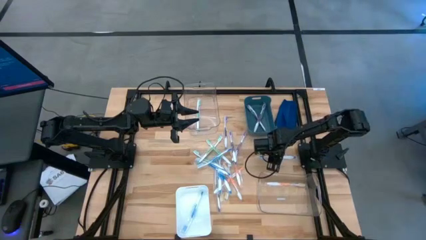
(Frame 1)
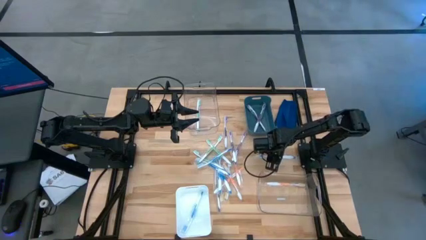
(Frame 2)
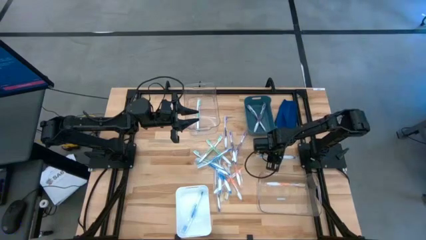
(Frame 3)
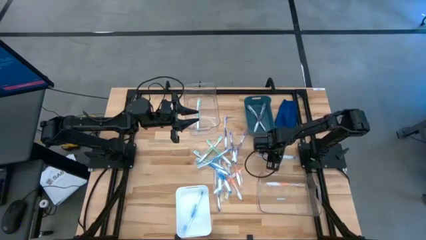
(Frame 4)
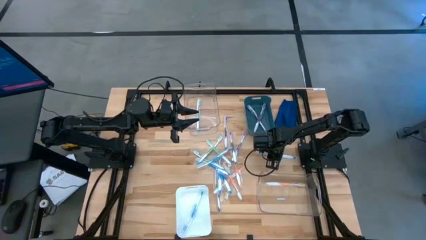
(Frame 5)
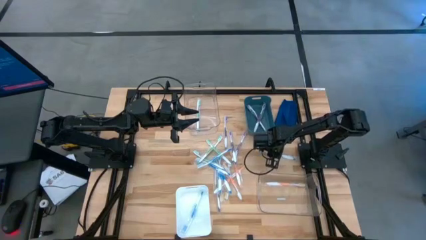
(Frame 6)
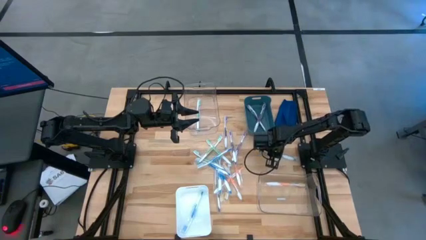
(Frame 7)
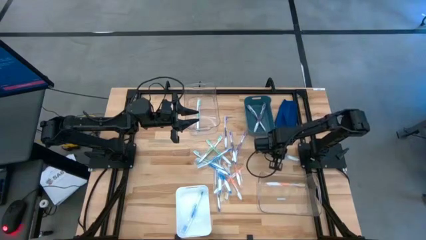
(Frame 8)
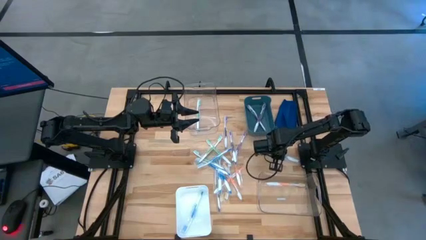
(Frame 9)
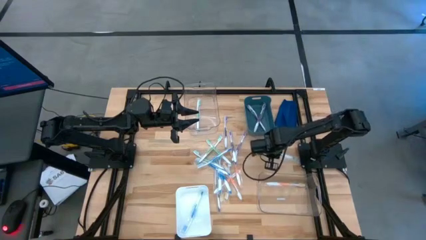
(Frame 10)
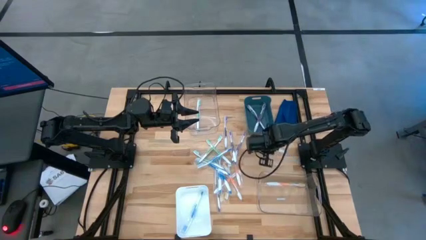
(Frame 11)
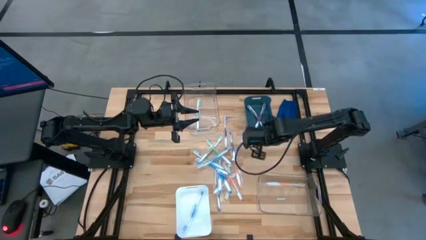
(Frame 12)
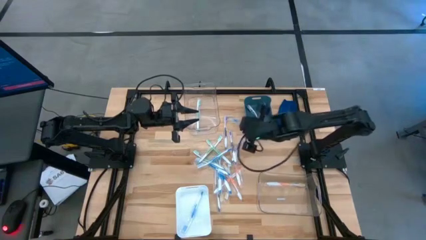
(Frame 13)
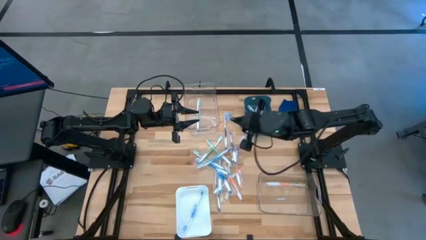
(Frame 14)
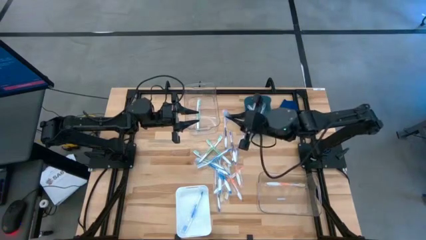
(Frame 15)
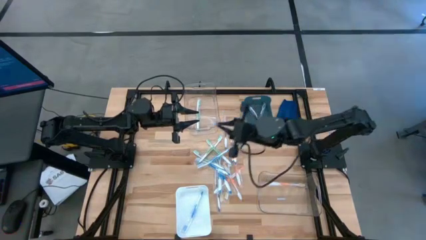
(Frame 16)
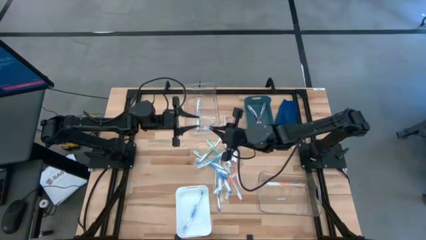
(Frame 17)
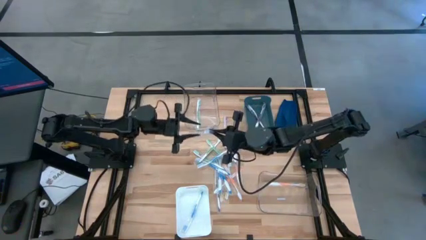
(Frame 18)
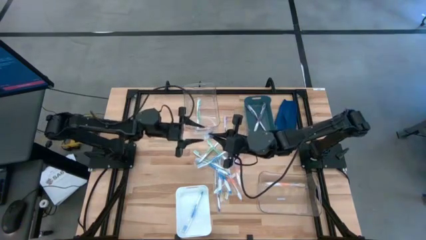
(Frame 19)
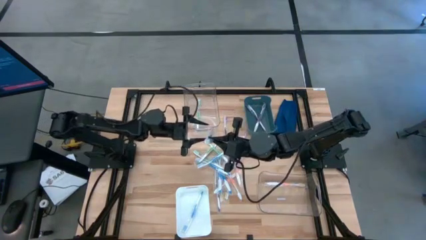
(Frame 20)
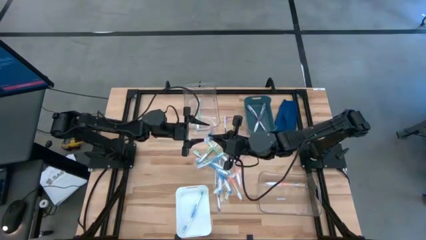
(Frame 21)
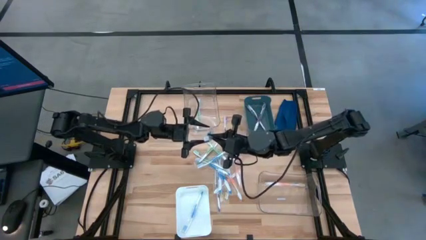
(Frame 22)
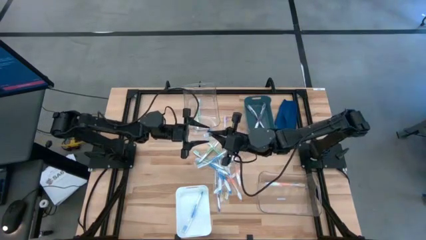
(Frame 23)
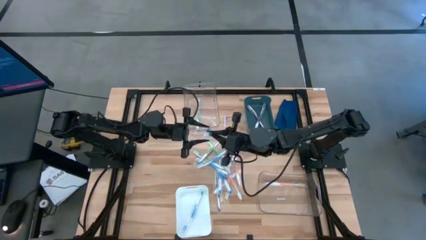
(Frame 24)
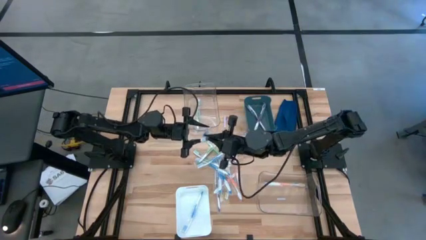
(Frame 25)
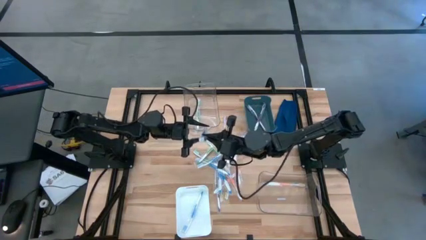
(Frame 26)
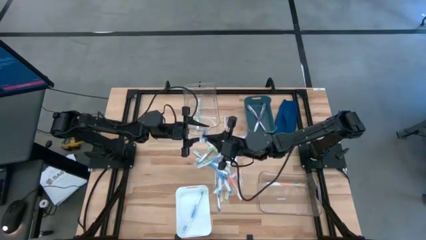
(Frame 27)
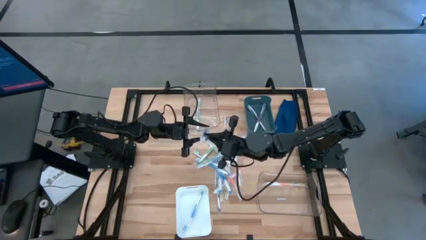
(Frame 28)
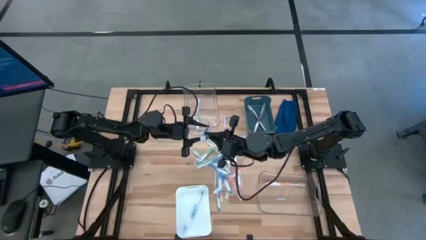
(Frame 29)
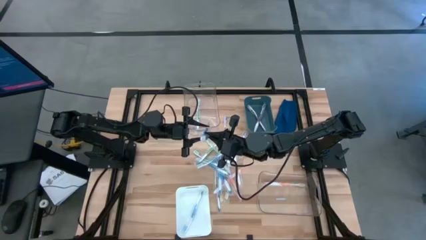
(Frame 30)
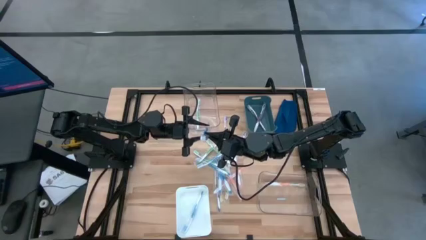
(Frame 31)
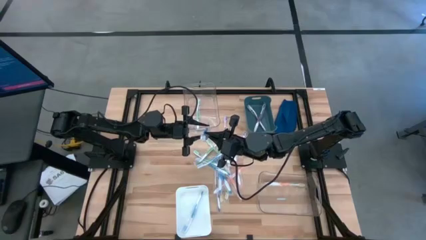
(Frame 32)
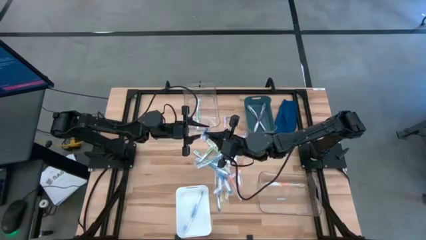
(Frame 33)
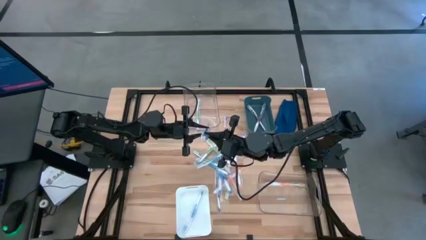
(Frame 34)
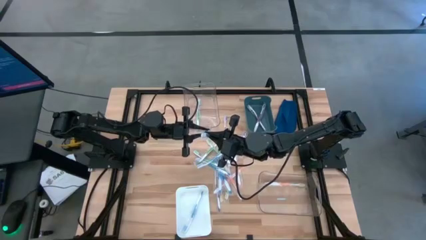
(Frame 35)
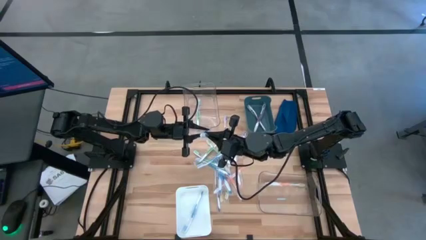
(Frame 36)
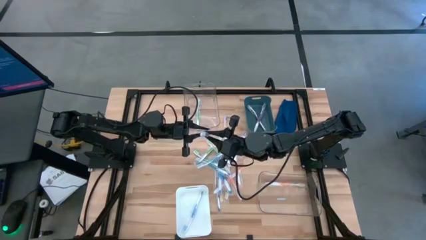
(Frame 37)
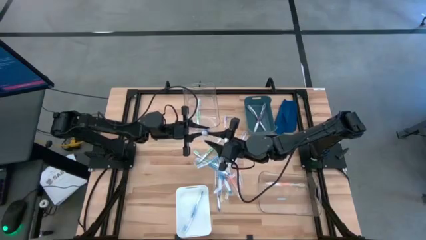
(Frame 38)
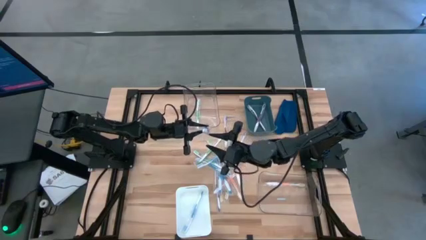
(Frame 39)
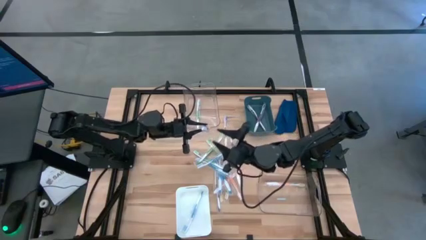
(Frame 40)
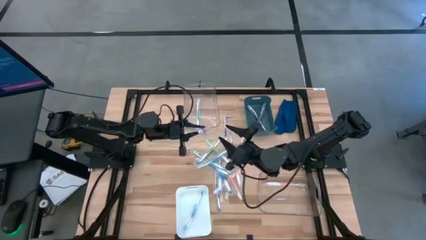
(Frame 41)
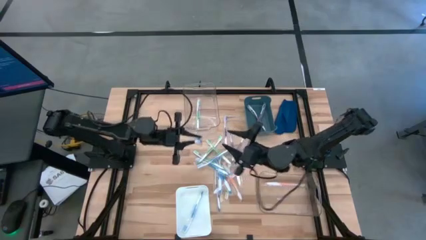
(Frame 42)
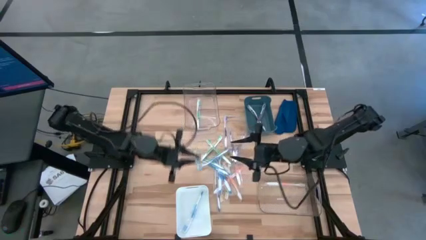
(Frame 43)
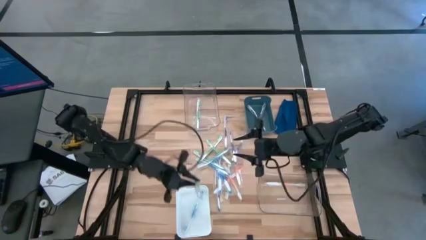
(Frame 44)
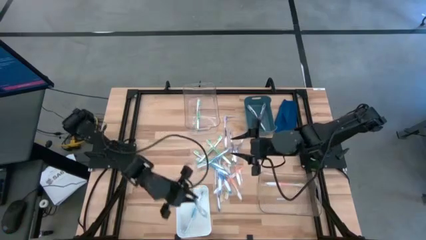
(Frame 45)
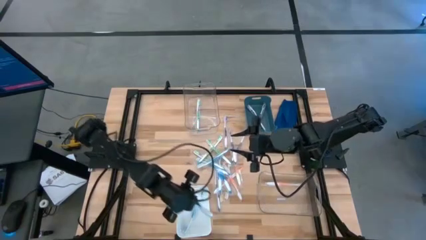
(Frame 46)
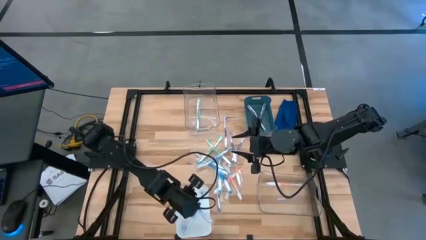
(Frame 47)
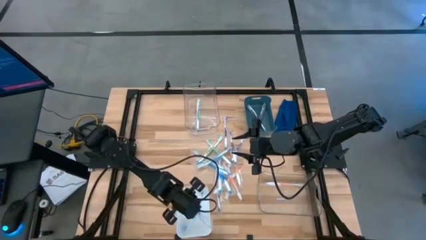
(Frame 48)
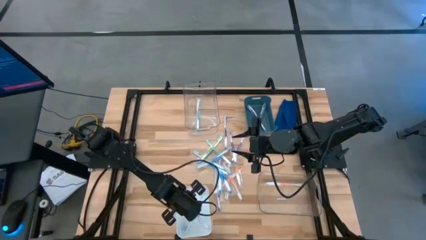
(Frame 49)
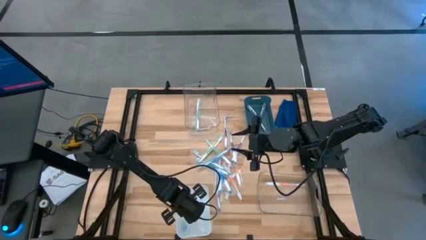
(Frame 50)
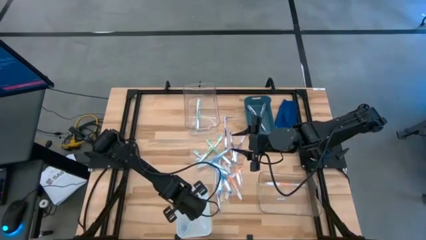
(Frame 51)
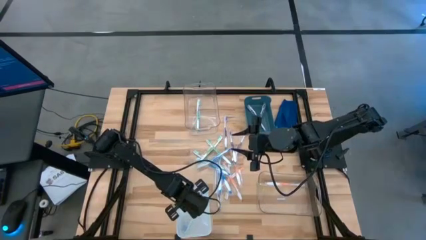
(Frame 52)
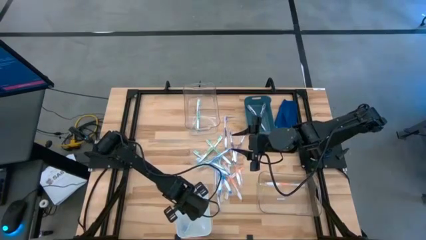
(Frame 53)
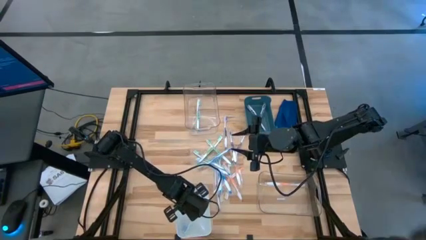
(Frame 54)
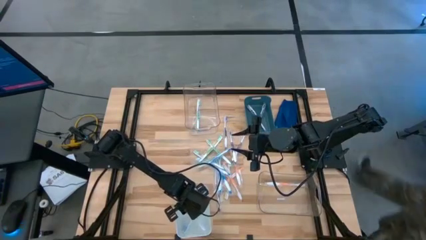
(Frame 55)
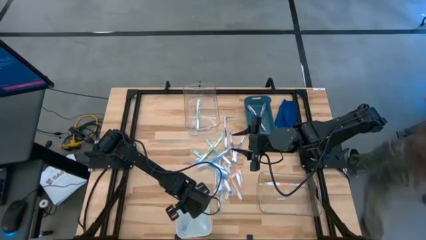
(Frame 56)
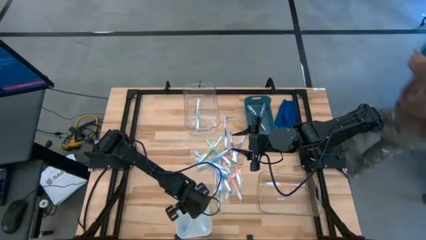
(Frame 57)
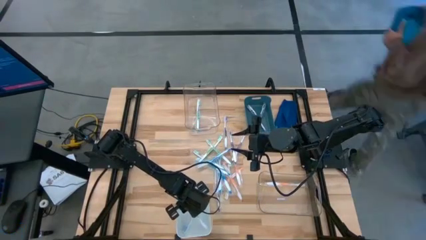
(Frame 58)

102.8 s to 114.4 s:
Task: Pick & Place Toothbrushes
Put the blue toothbrush into the white bin

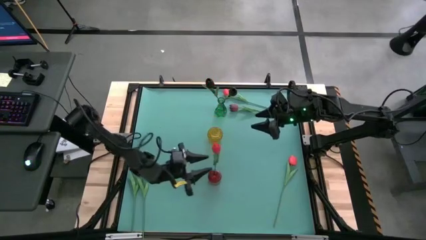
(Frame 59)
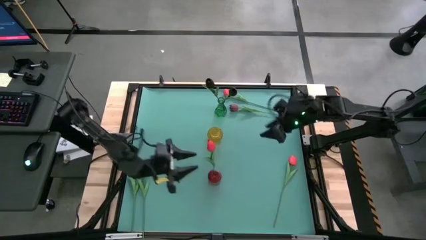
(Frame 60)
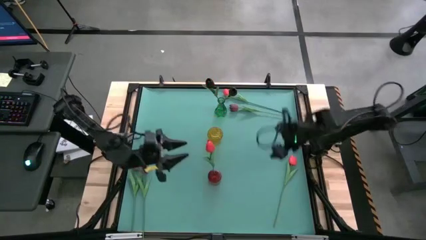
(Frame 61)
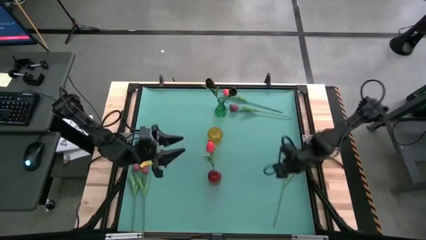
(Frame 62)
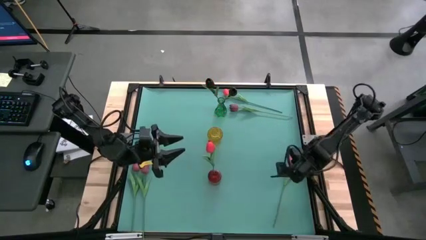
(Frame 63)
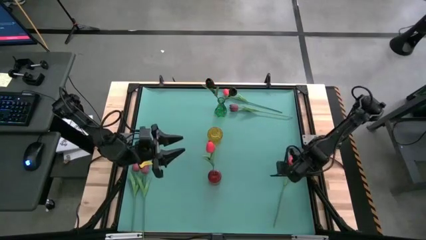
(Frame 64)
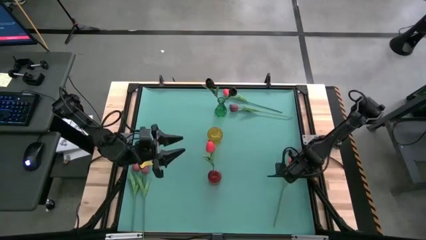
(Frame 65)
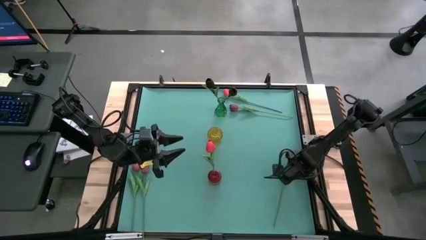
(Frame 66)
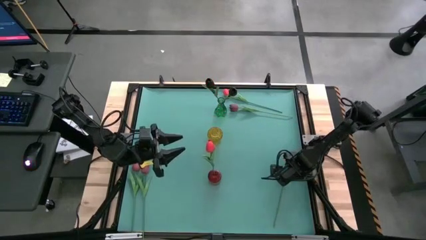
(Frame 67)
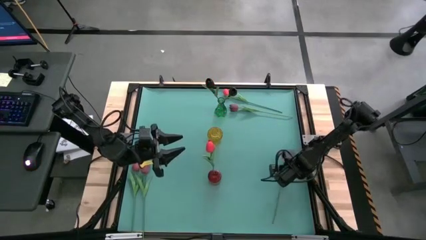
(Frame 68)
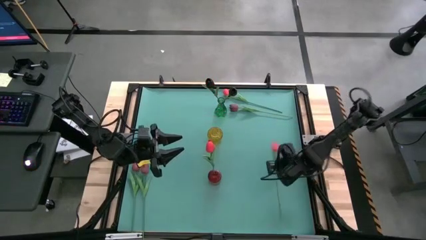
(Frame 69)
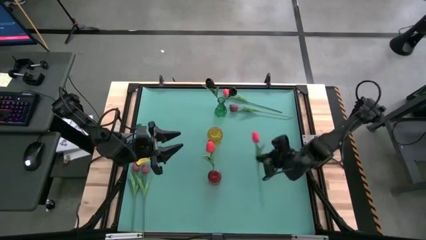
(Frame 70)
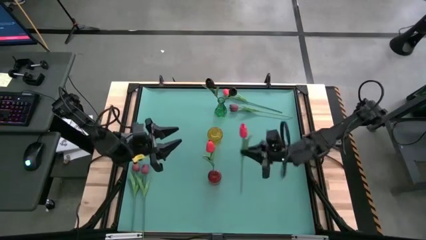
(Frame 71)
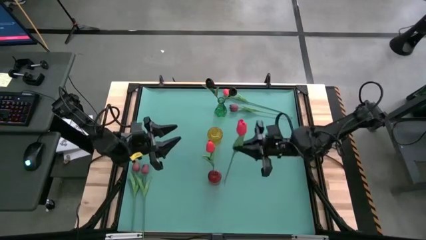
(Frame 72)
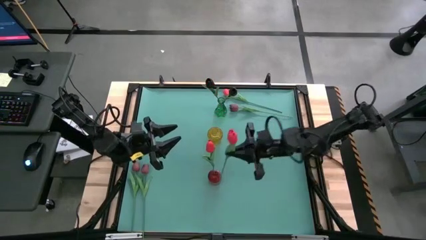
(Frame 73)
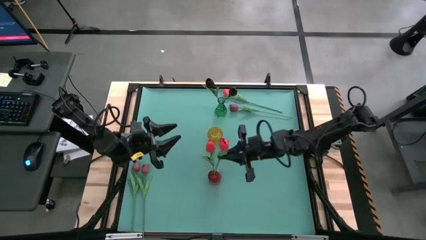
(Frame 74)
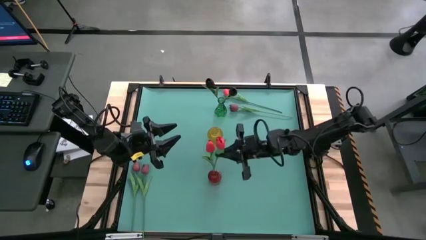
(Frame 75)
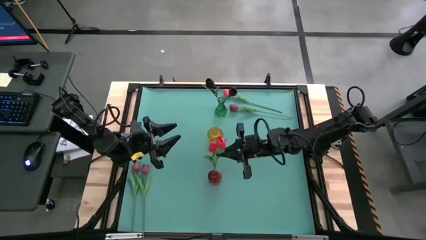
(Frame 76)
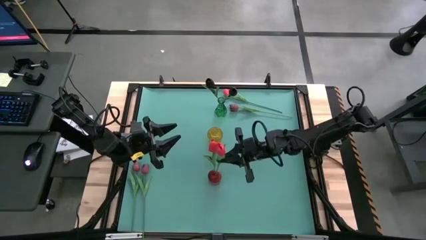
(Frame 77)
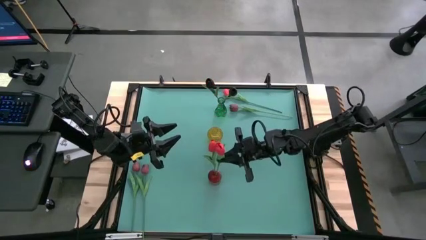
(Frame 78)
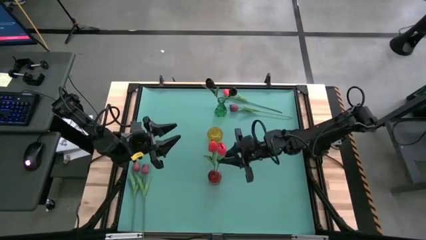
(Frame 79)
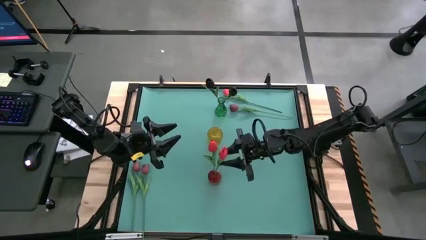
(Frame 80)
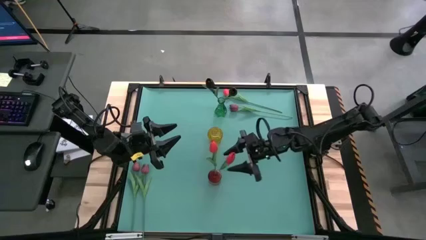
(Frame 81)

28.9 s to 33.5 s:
Task: Sort flowers into vase by color
Put the bottom pink flower into the red flower vase
